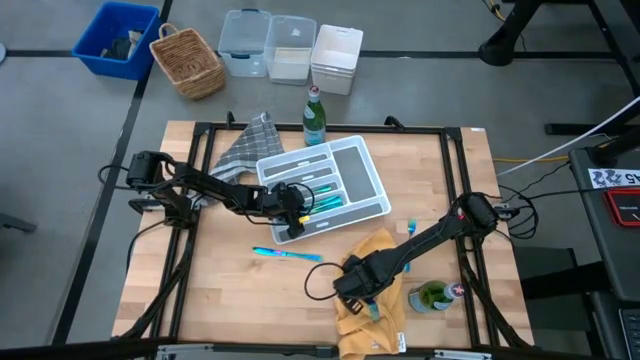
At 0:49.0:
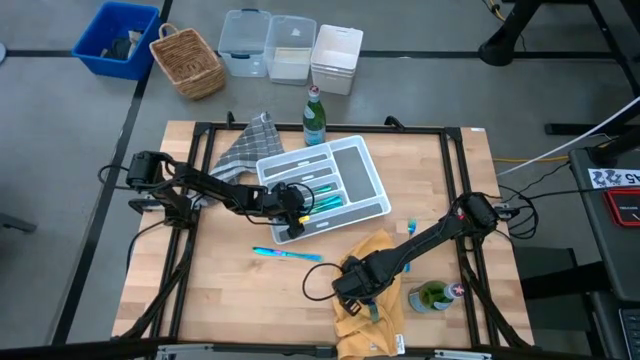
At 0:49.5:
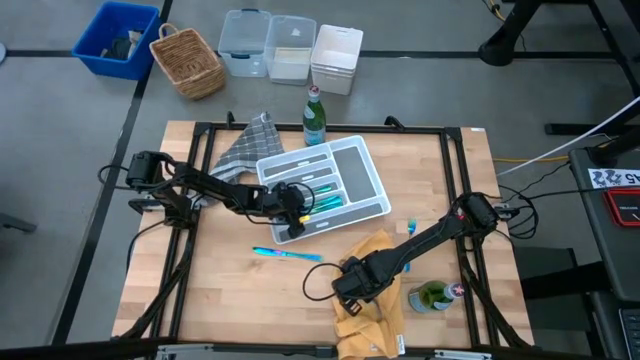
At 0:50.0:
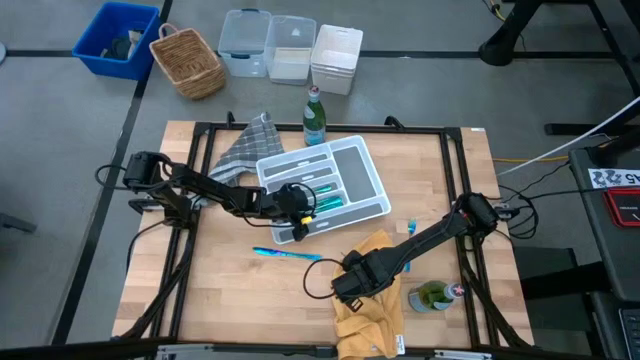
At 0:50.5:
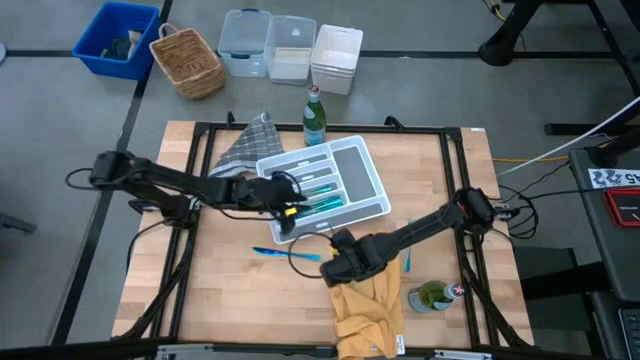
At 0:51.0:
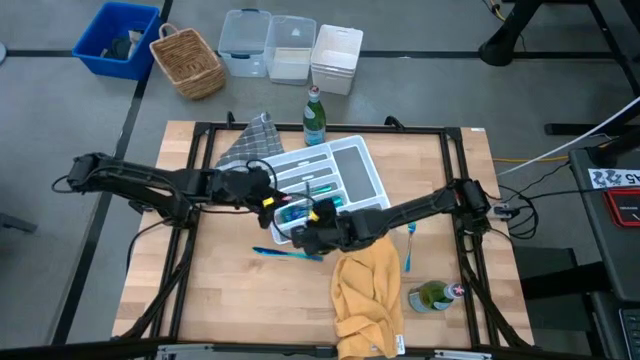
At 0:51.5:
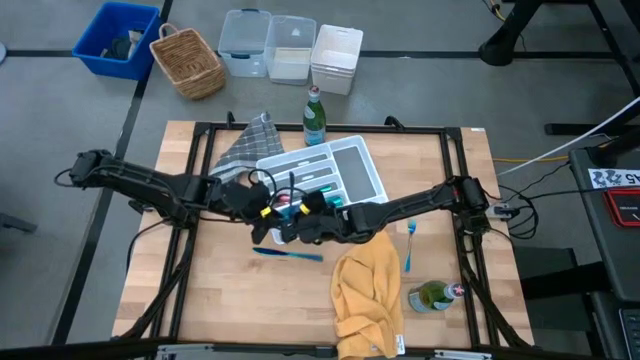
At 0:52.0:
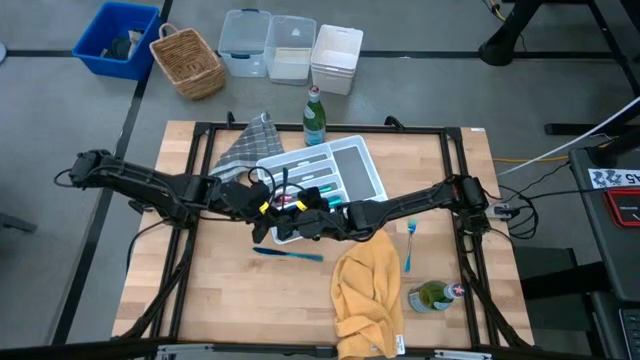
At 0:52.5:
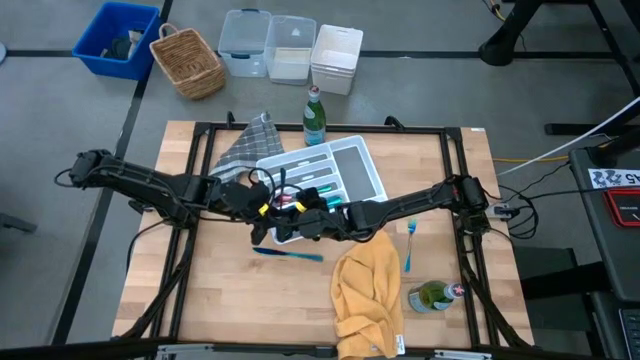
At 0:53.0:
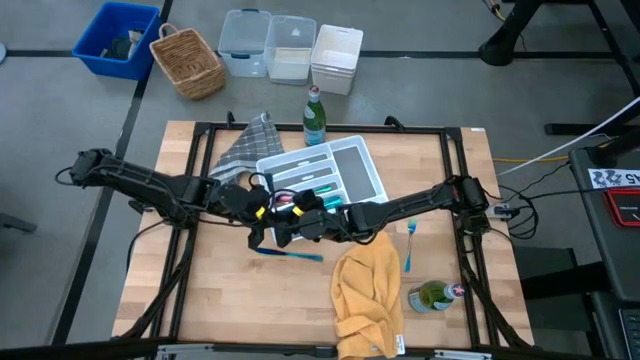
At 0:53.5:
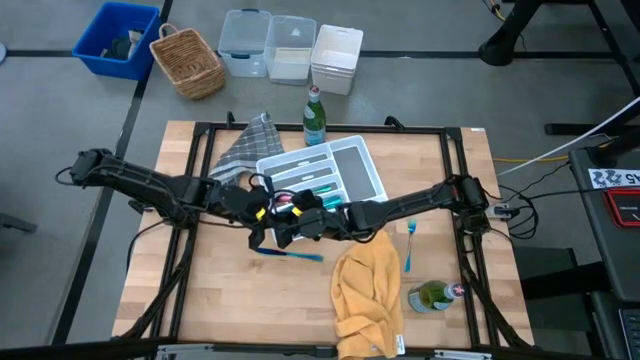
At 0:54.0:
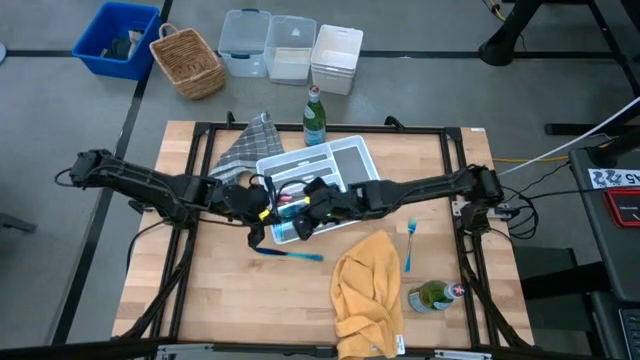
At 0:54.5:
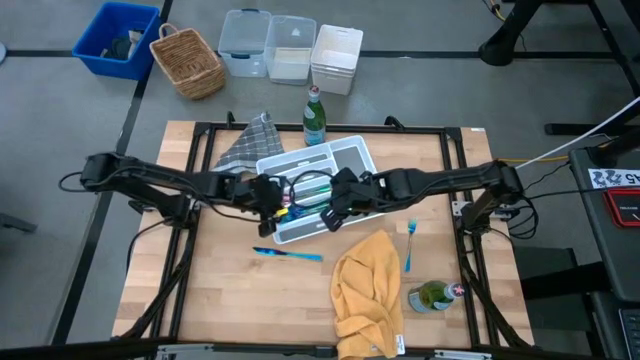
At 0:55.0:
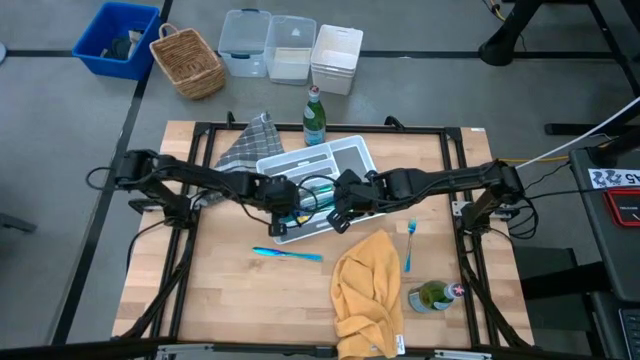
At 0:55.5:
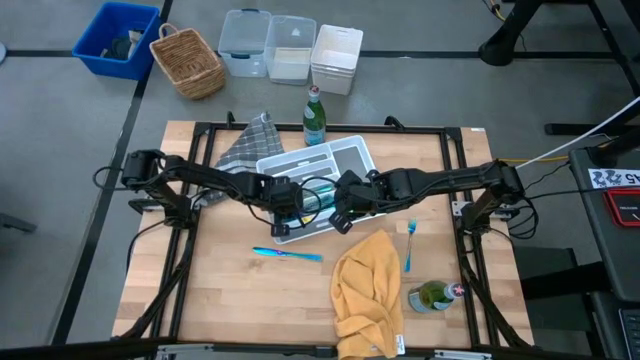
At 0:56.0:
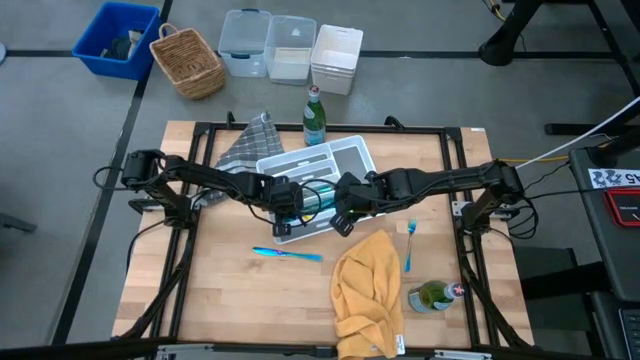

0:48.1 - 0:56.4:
Task: Sort silverware
Put the fork in the silverware tray

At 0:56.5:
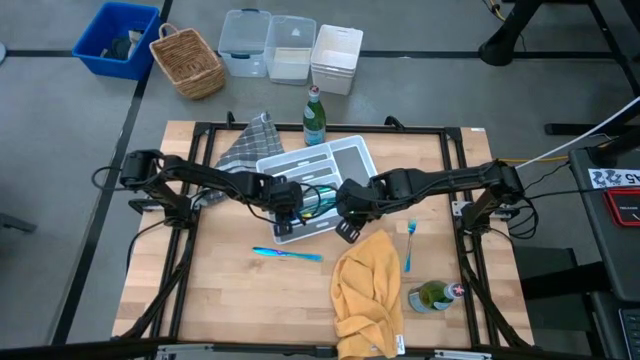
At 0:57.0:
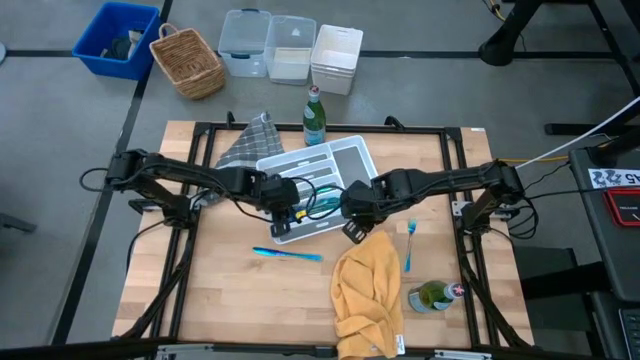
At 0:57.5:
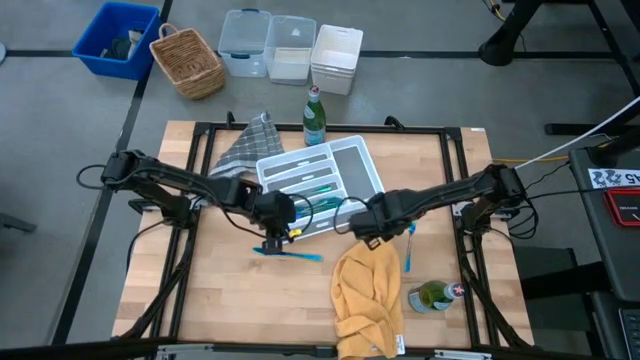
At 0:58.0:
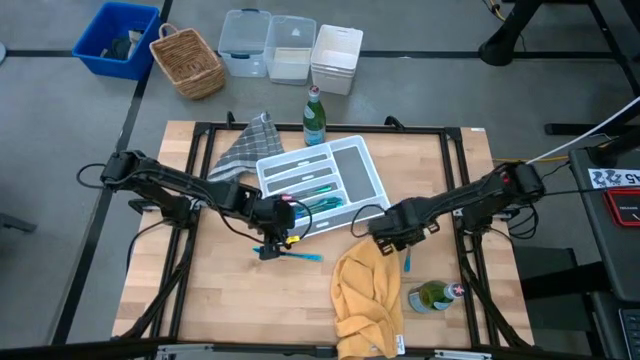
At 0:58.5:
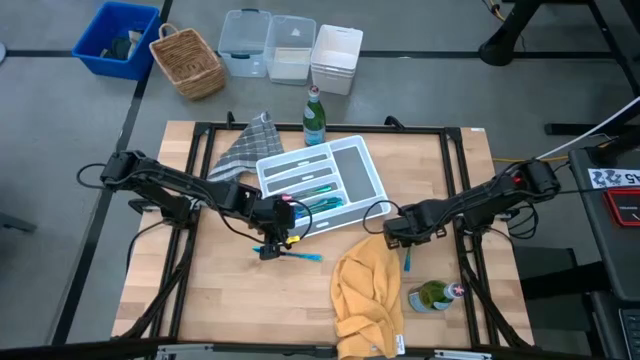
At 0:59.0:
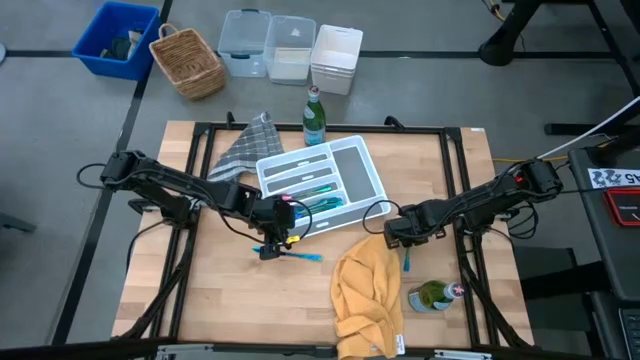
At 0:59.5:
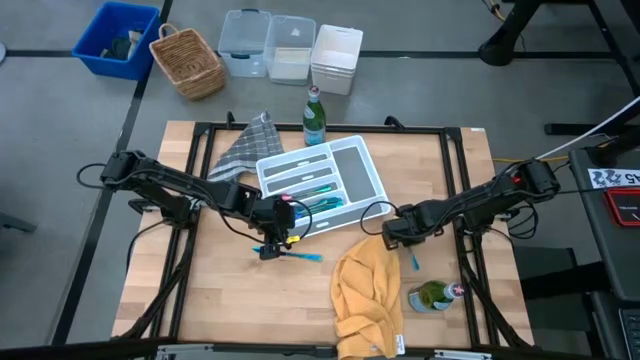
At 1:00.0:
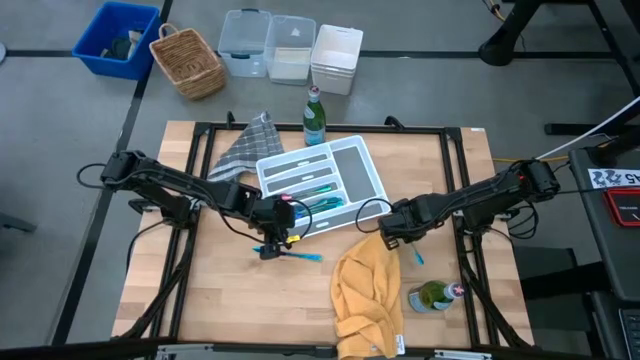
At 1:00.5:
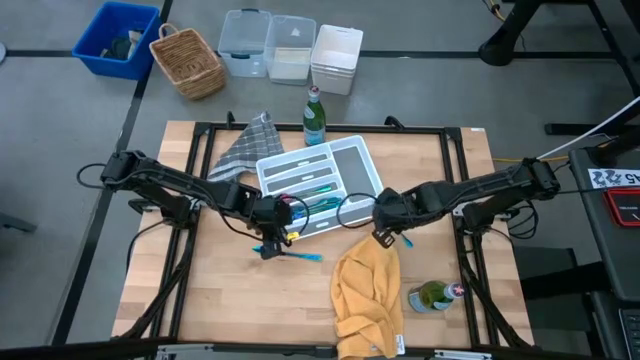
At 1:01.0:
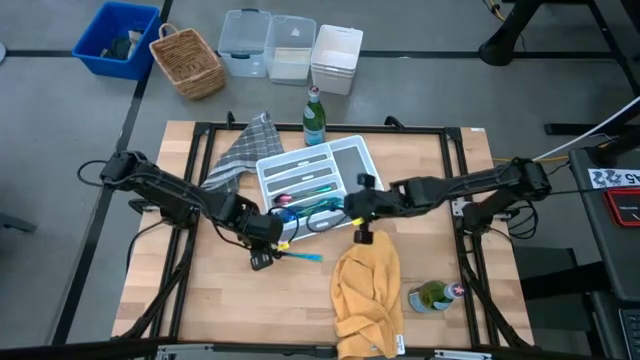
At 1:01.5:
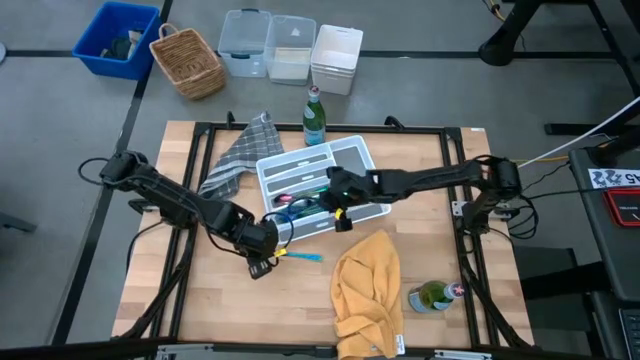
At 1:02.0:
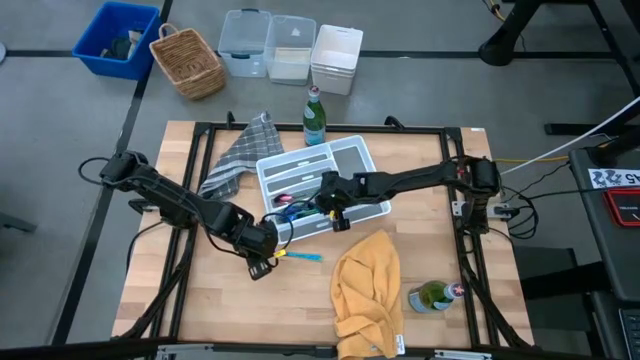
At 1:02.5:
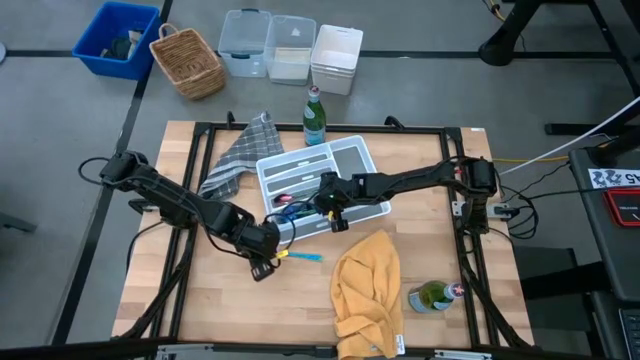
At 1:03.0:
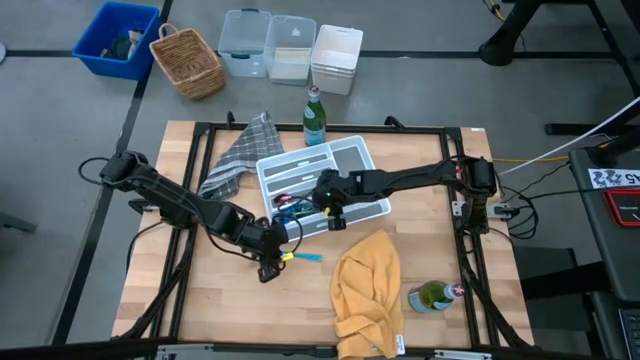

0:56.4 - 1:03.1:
Put the fork in the silverware tray

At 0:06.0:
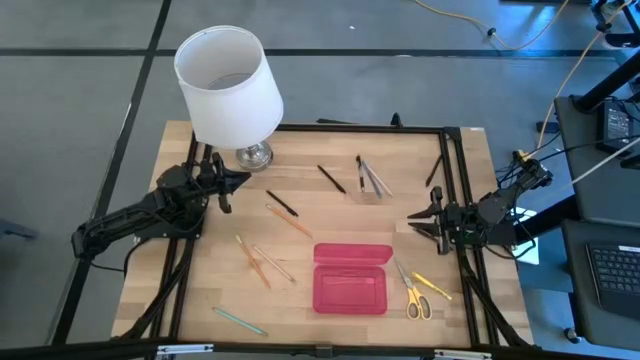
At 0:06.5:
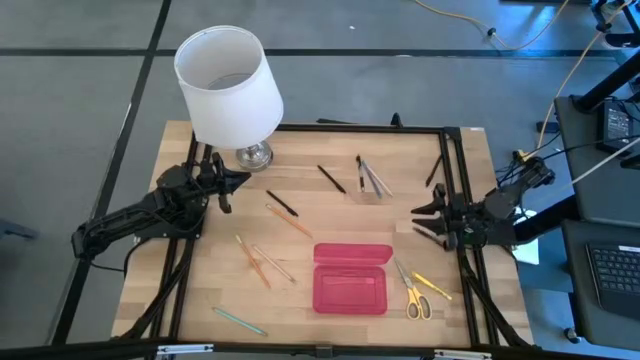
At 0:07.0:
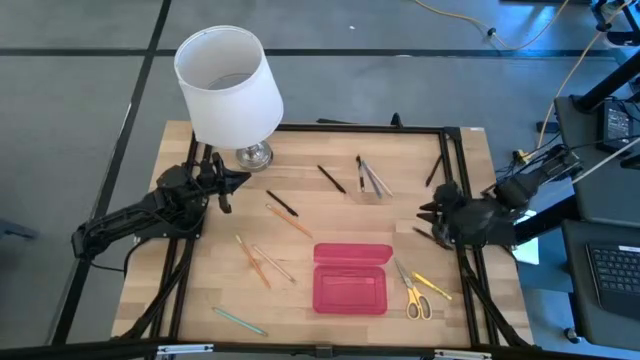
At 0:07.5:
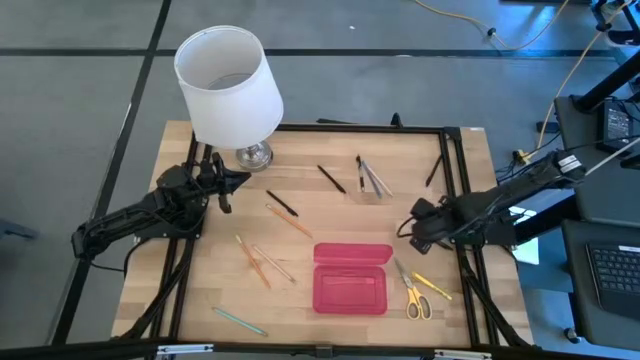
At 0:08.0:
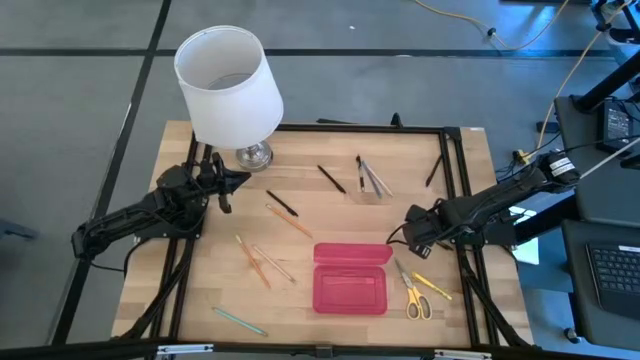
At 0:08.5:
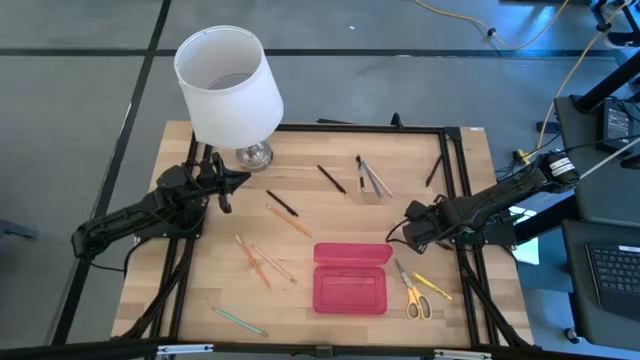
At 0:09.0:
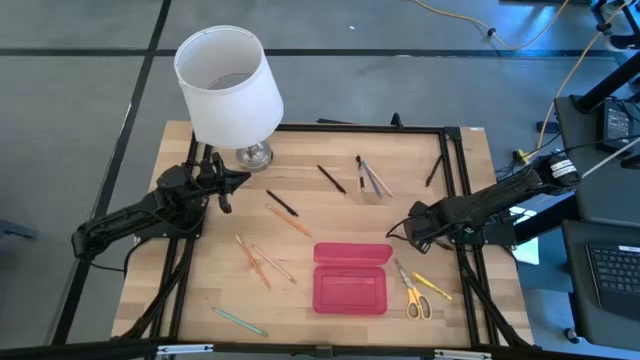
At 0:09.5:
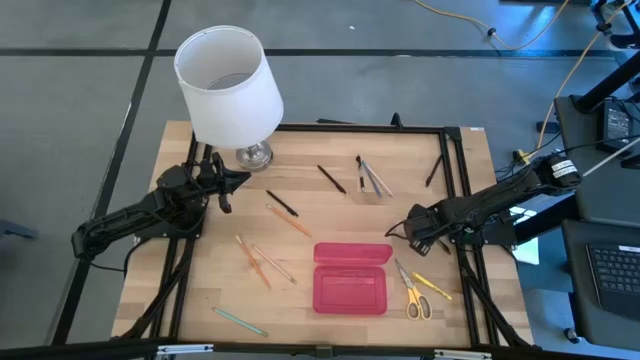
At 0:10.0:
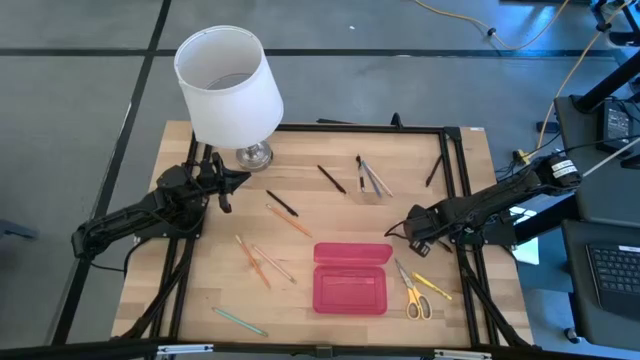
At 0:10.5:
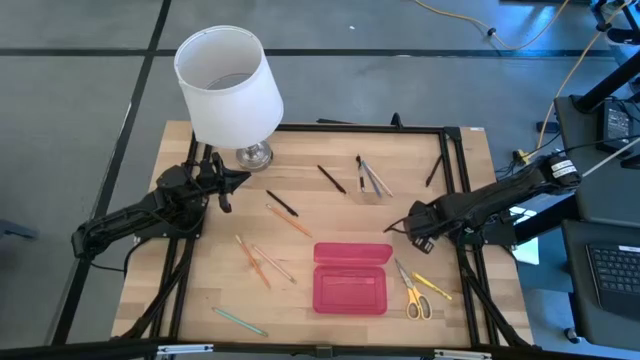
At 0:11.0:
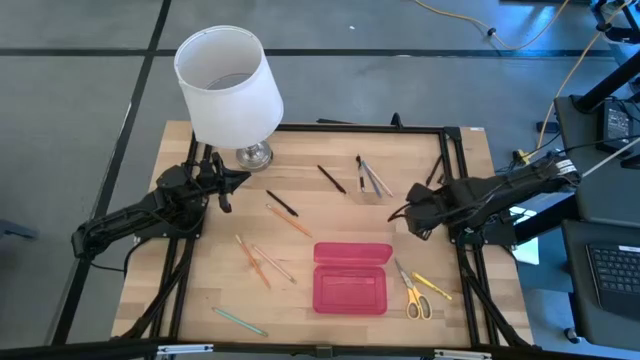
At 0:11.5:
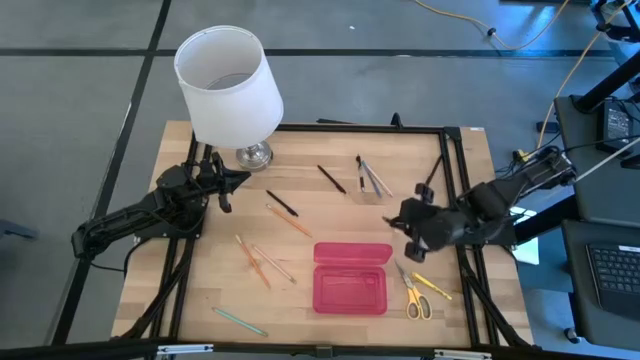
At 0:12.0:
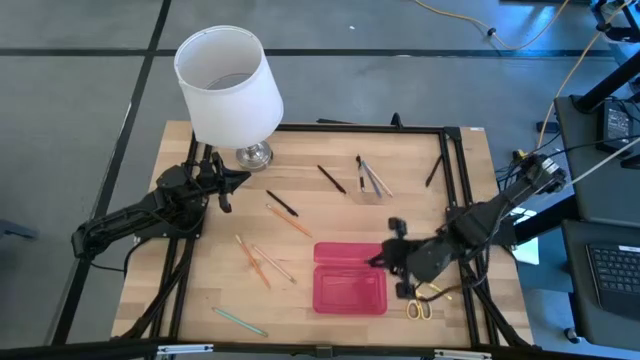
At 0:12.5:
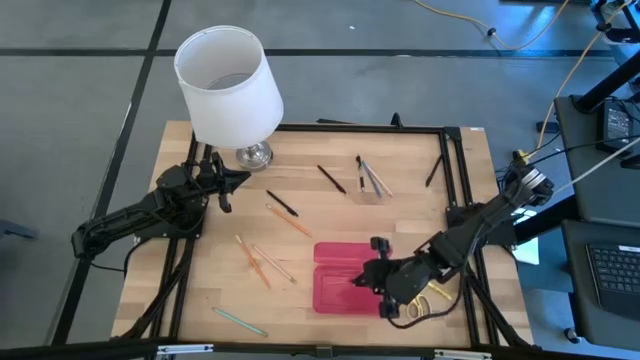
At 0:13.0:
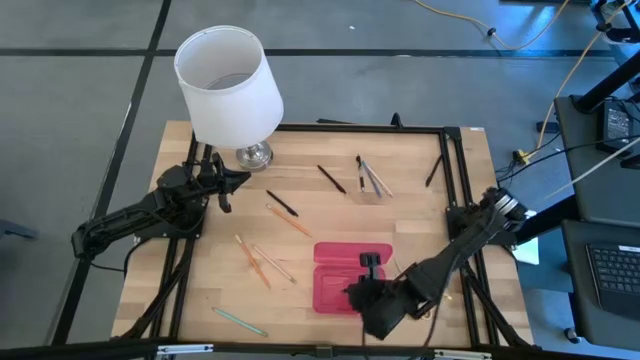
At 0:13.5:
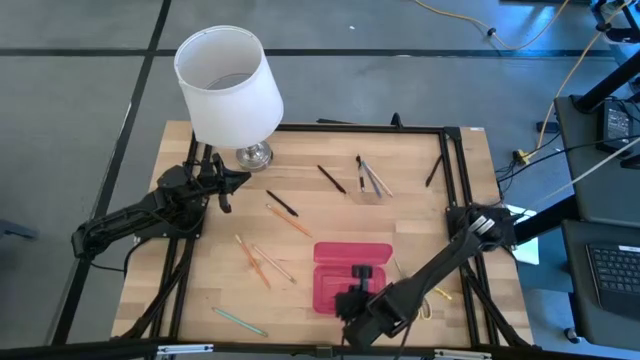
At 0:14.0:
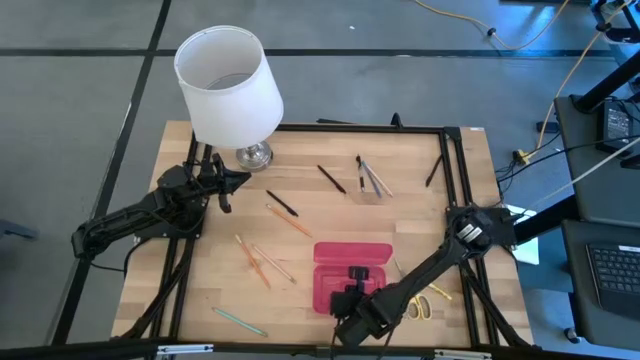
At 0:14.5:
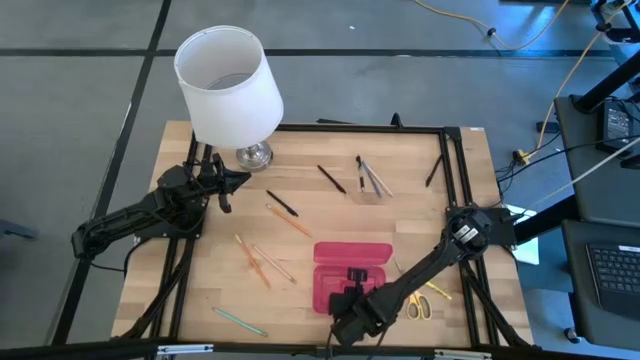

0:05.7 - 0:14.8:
Task: Pick & place school supplies into a supply box
Put the transparent pen into the pink supply box
